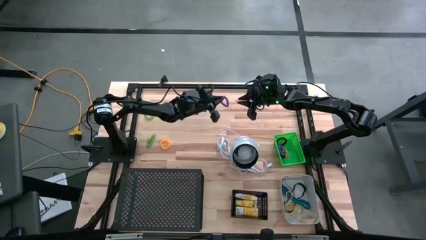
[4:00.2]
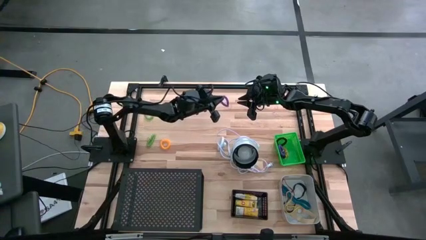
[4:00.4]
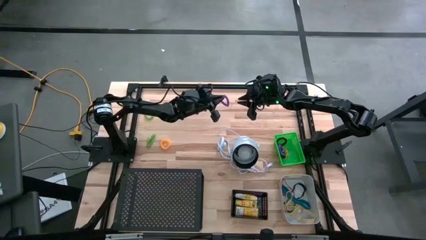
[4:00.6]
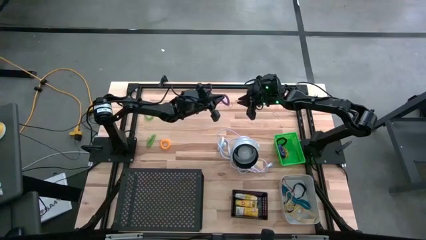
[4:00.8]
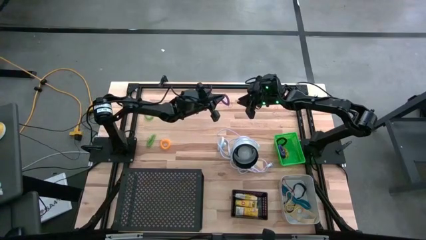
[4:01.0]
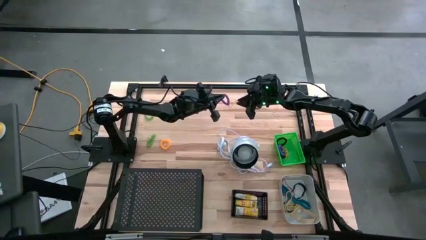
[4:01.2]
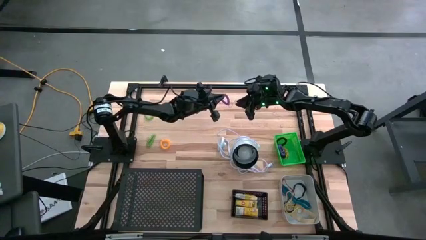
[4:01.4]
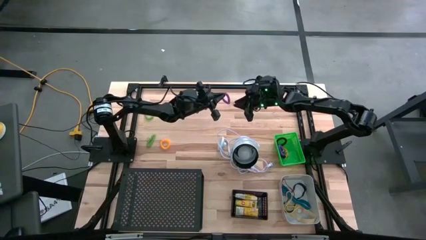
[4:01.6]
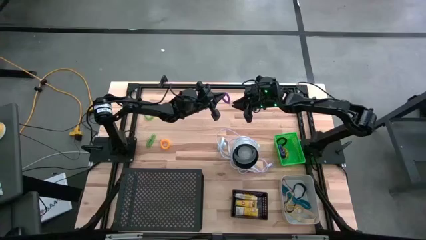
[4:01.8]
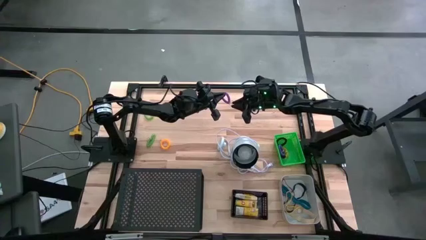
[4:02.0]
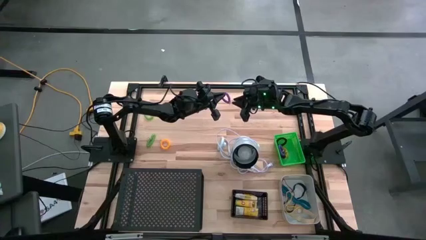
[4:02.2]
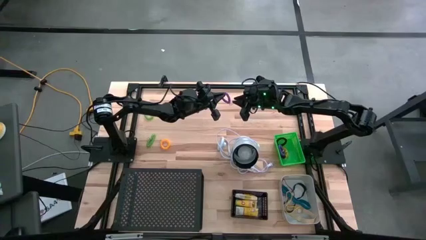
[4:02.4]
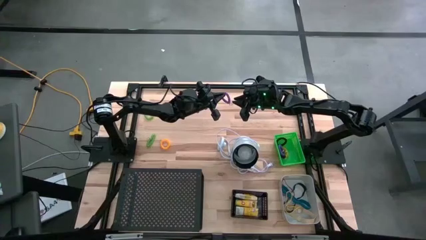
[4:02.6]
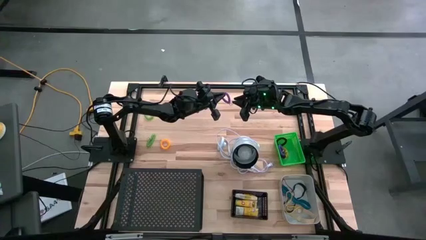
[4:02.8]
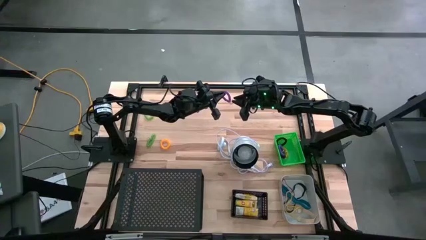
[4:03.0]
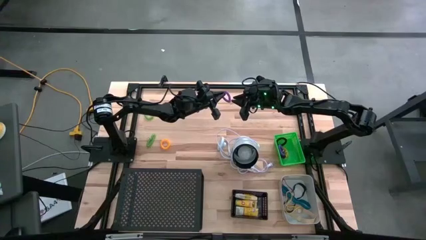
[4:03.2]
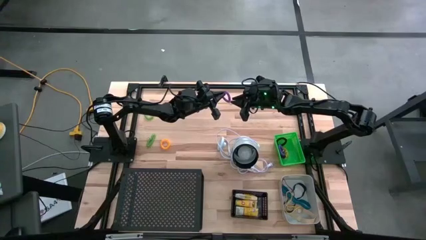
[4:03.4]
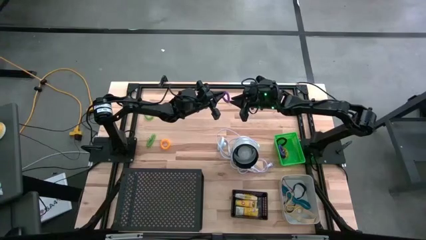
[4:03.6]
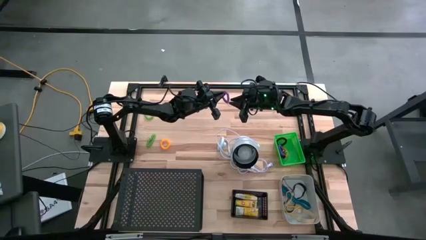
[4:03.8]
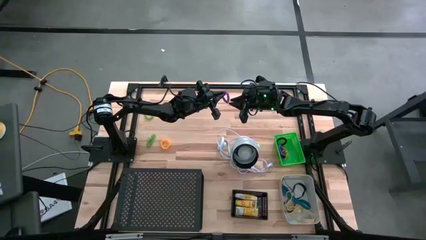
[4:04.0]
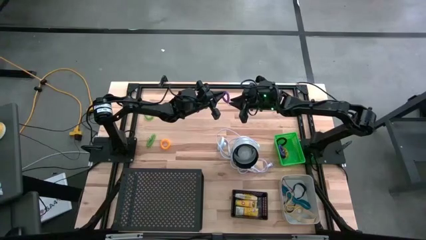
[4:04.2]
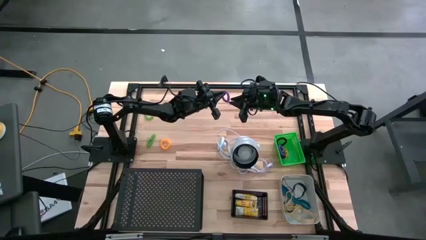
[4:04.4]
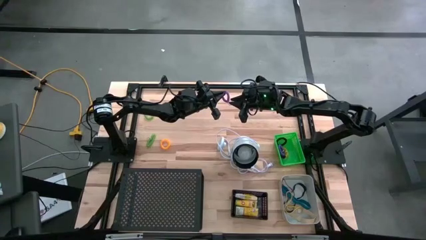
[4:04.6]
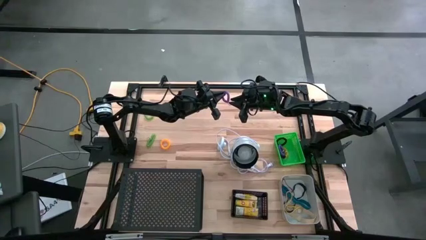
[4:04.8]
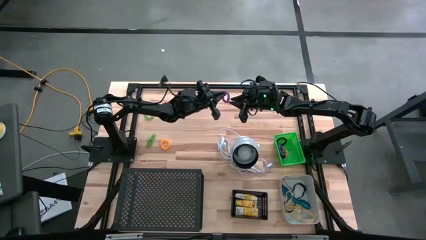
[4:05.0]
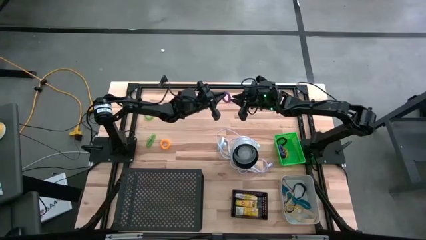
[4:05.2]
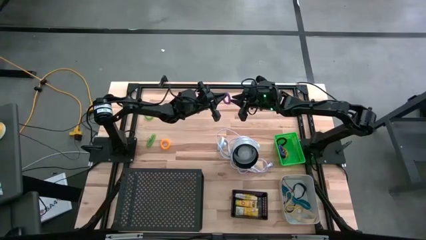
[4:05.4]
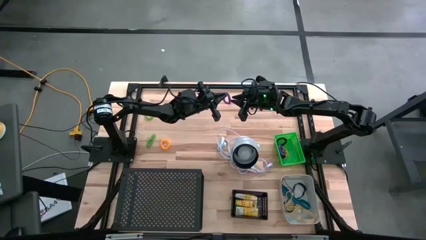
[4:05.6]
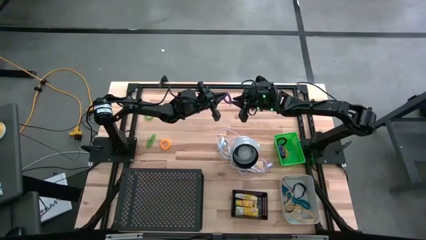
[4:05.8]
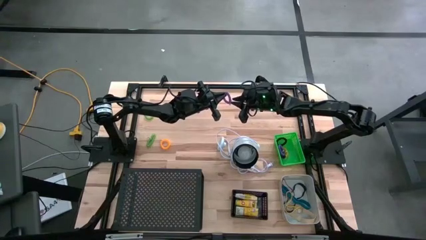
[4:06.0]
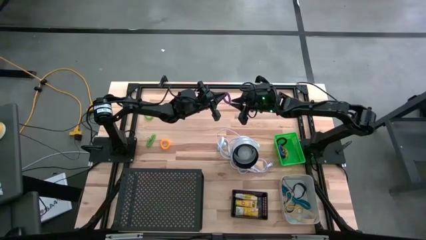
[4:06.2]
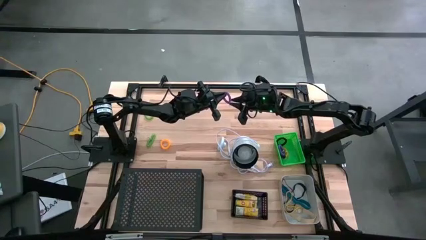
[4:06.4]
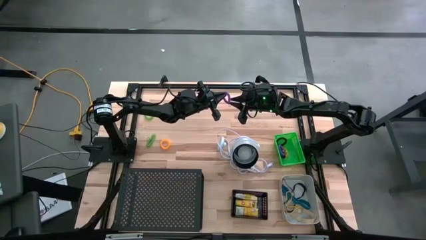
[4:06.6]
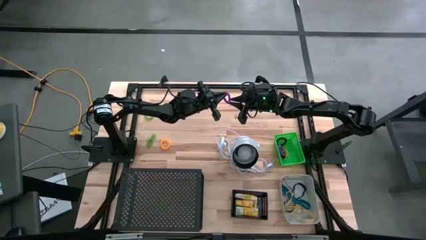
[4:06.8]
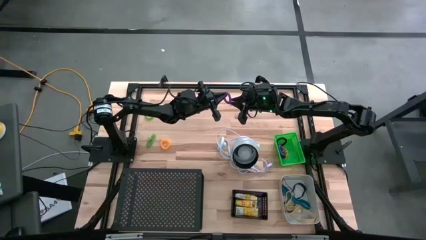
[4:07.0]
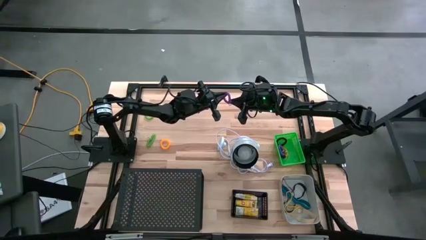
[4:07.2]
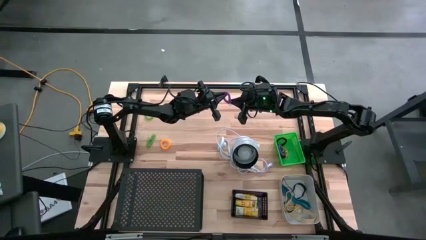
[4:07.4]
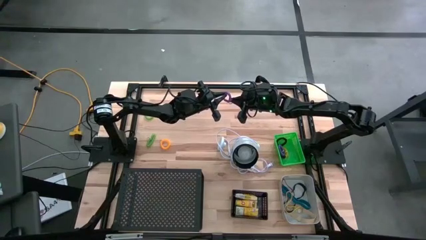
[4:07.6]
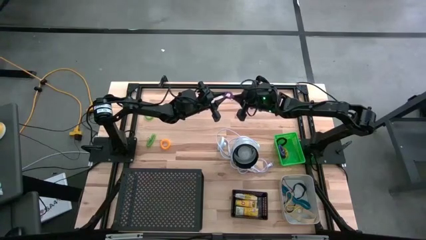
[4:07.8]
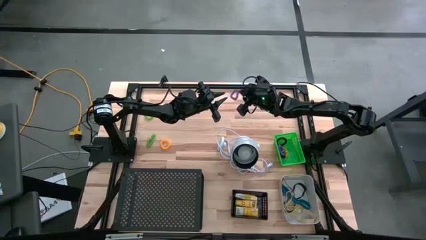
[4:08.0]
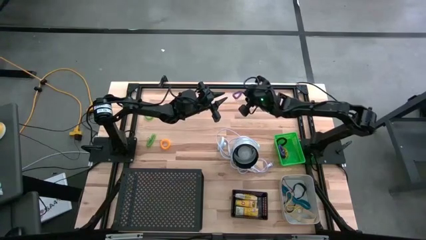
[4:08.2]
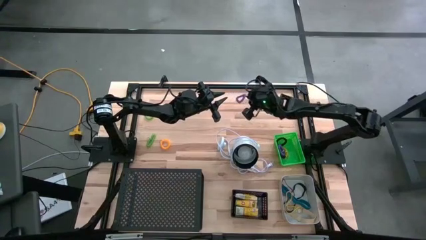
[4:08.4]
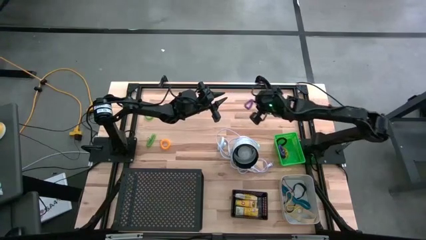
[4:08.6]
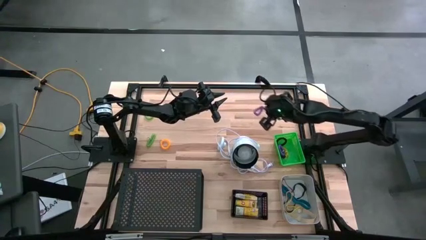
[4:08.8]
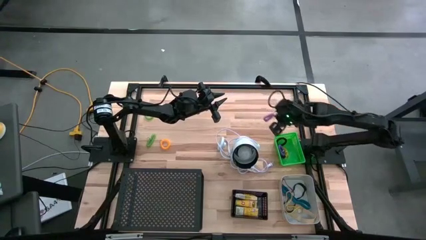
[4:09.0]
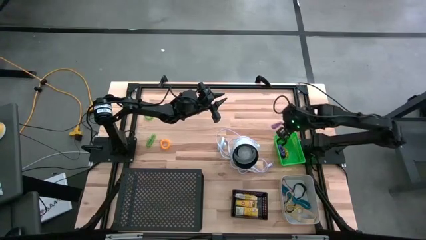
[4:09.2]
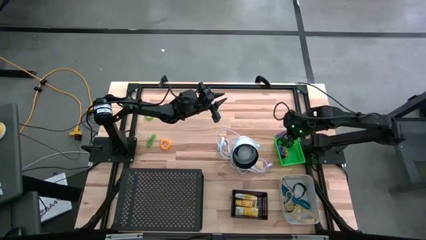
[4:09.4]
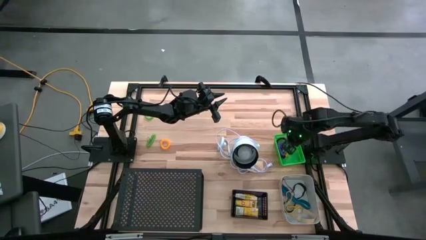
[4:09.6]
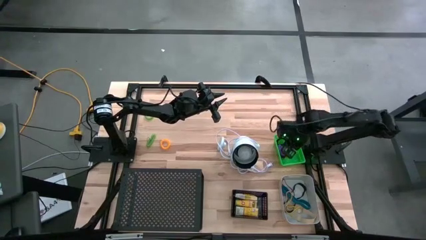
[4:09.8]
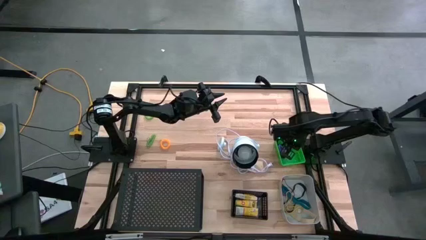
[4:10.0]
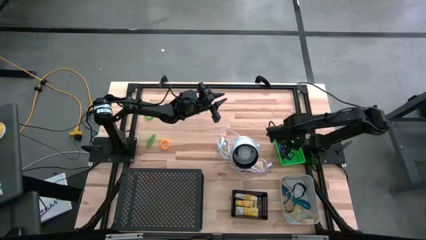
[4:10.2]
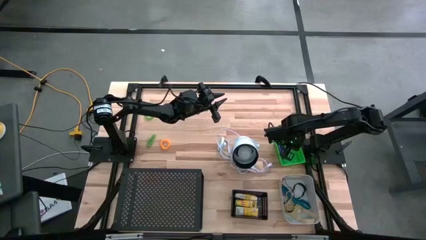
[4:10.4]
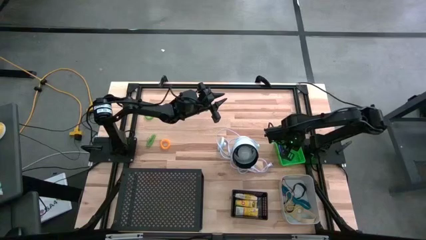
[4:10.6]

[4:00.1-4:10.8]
Task: Pick & Place Office Desk Supplies
Put the purple spring keychain into the green bin

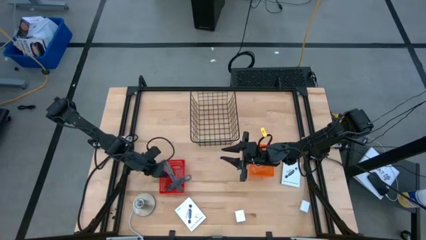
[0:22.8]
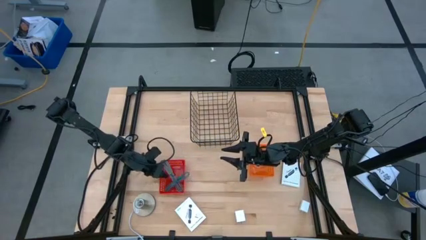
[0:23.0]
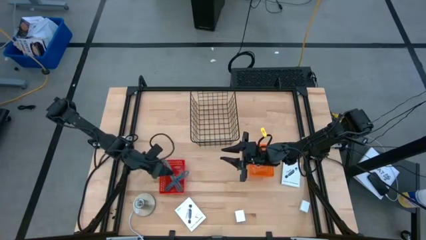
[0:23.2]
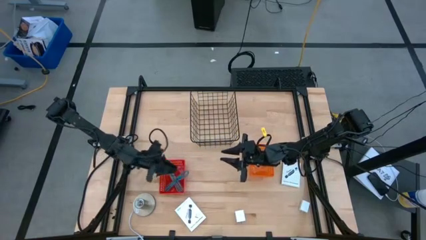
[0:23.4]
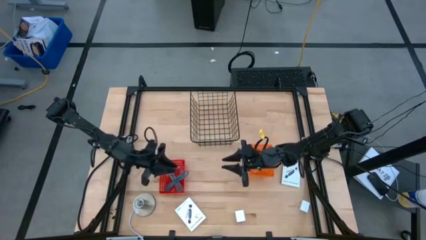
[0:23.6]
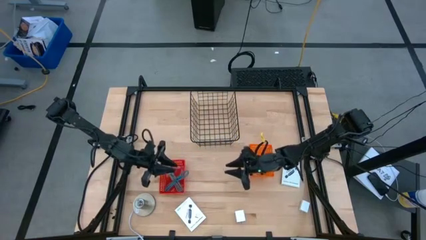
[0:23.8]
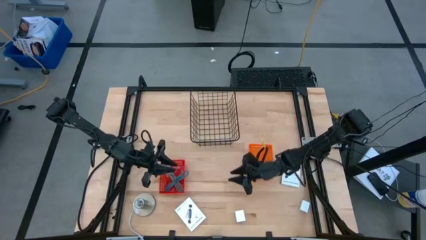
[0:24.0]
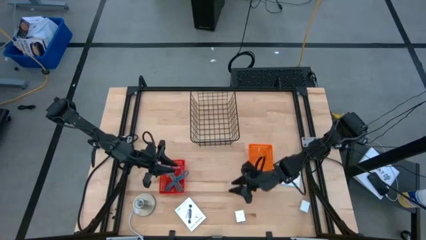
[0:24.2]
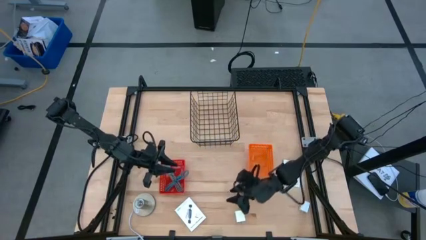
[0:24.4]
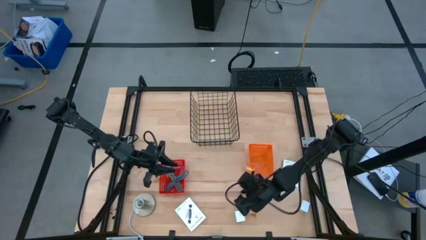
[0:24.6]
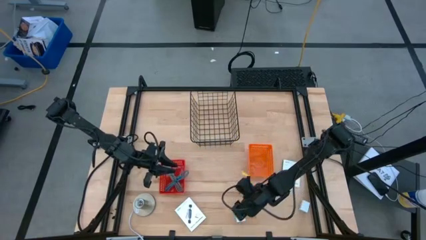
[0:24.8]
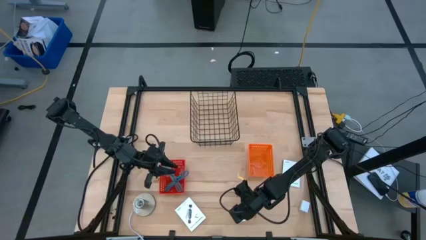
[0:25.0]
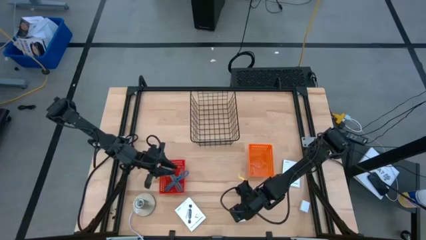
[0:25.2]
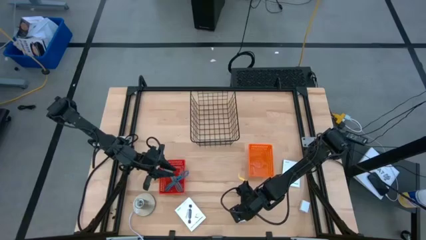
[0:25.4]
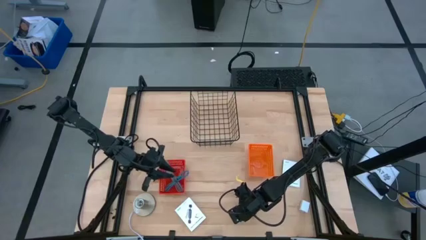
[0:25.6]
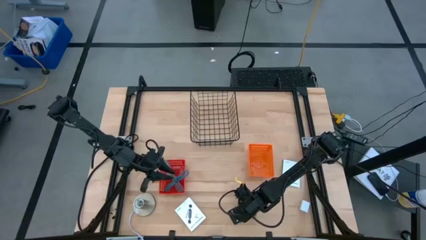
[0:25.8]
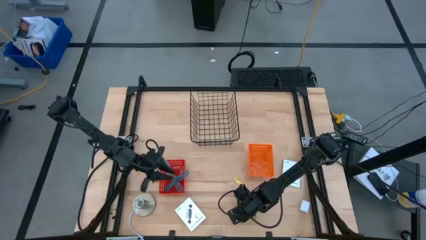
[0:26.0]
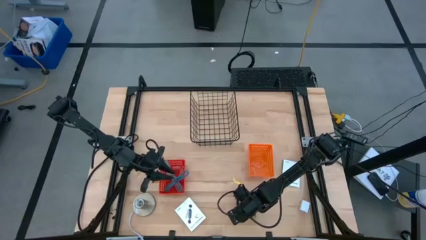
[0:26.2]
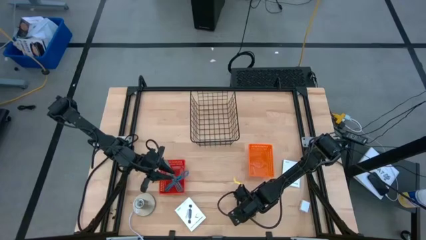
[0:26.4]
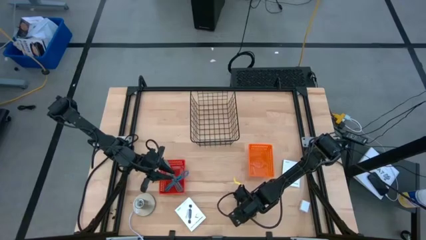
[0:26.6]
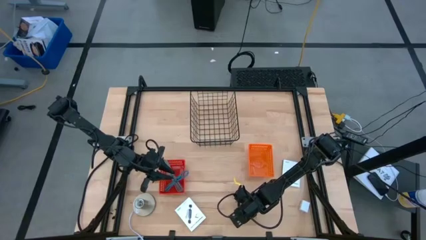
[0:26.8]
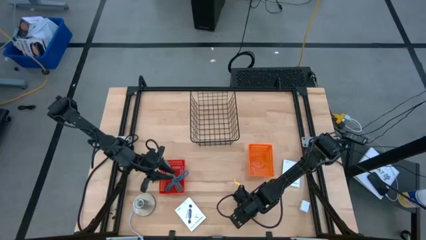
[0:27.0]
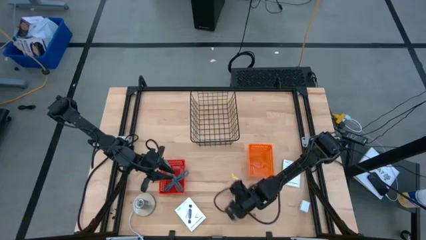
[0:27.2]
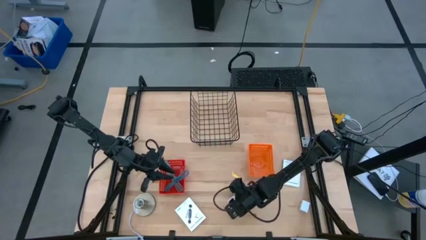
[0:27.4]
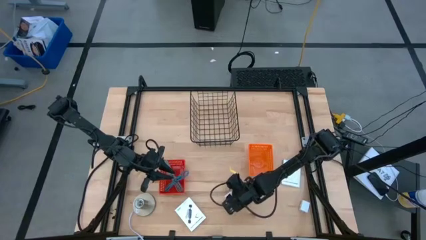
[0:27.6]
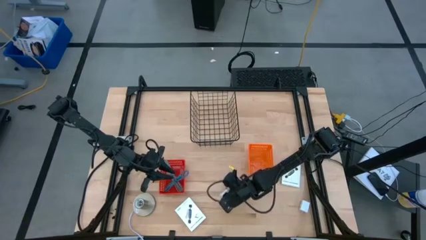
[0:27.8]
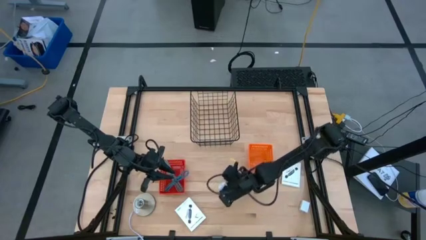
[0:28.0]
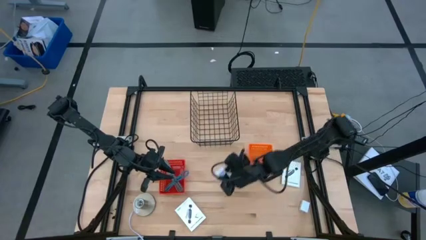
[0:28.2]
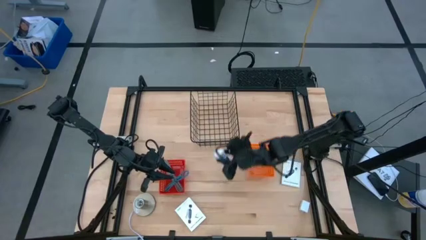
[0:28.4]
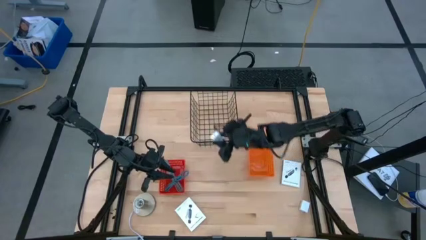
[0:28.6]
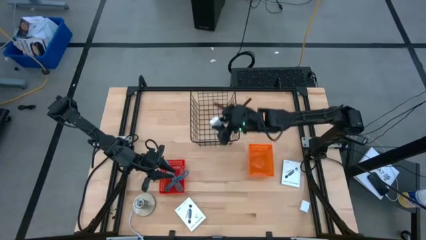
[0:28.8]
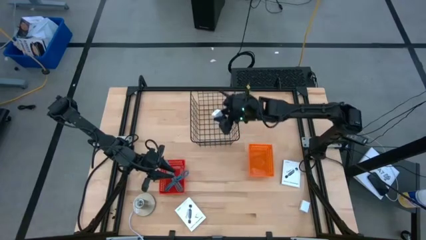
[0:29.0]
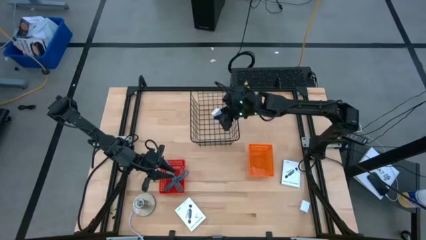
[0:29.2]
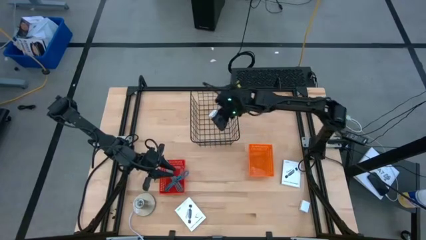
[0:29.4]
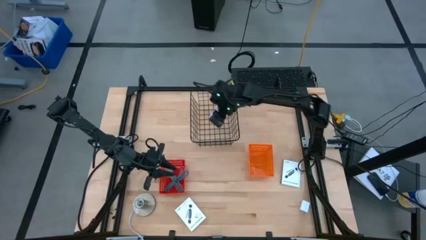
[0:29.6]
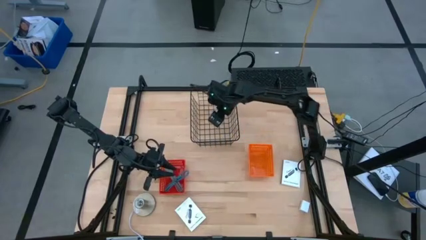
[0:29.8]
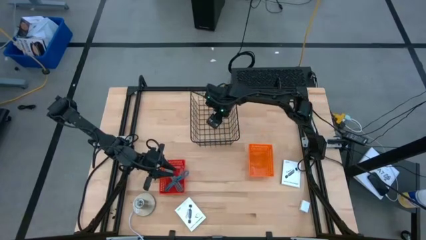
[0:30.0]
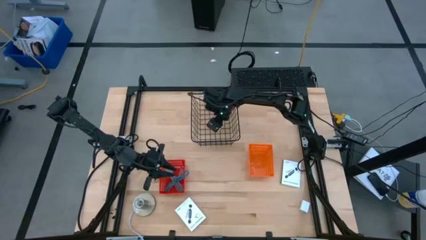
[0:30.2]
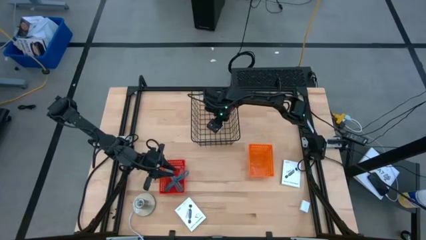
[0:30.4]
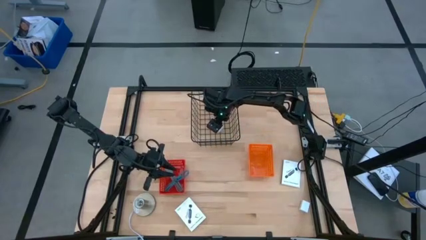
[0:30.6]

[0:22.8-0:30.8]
Task: Pick and place items into bin
Put the left white charger adapter into the black wire basket
